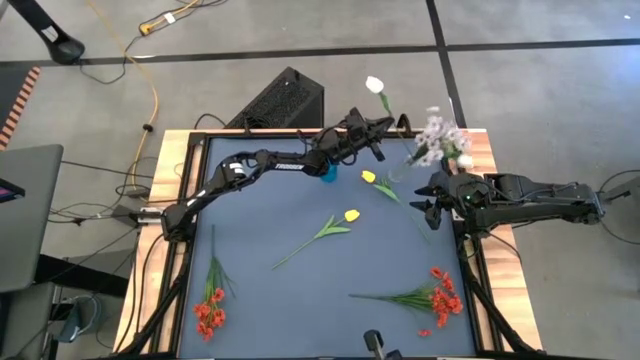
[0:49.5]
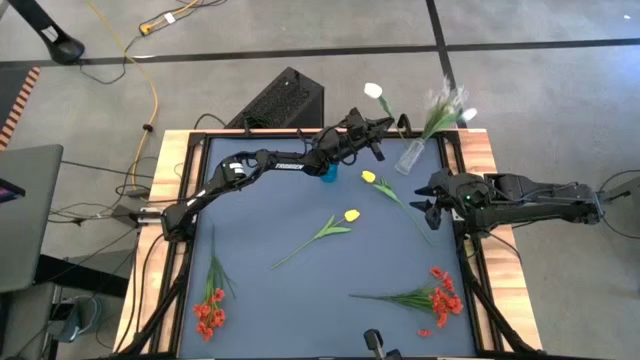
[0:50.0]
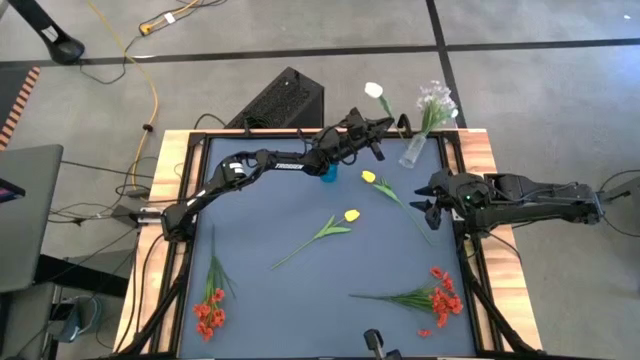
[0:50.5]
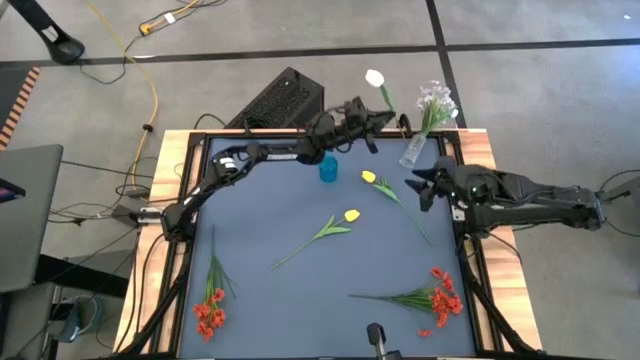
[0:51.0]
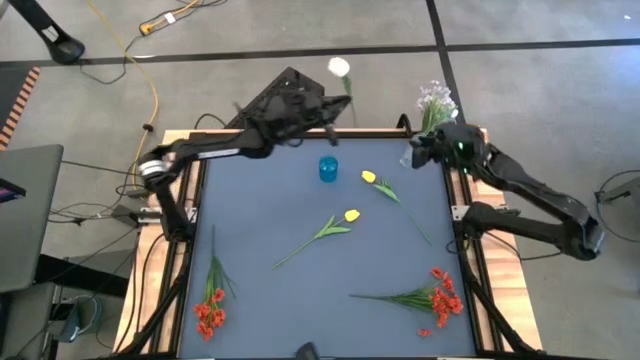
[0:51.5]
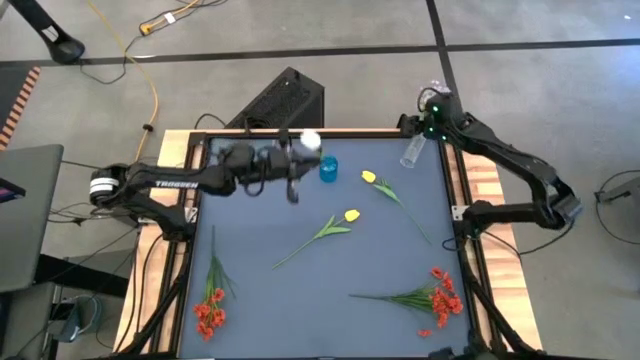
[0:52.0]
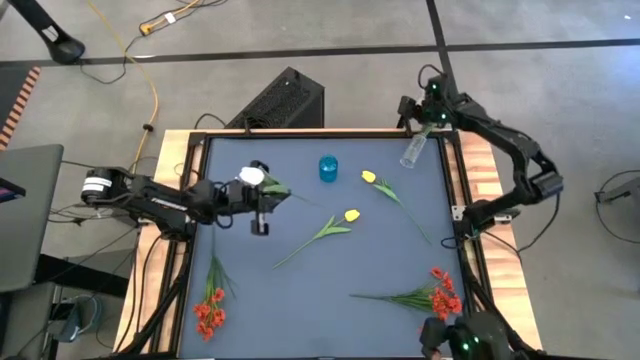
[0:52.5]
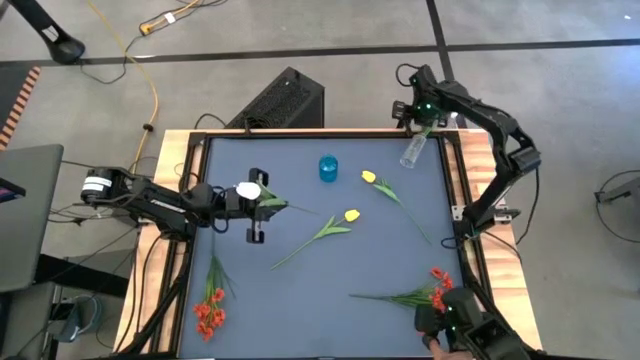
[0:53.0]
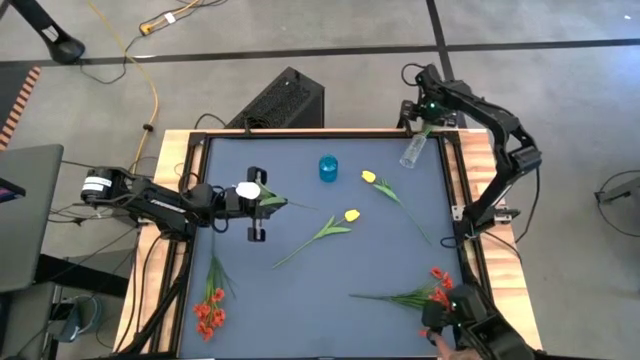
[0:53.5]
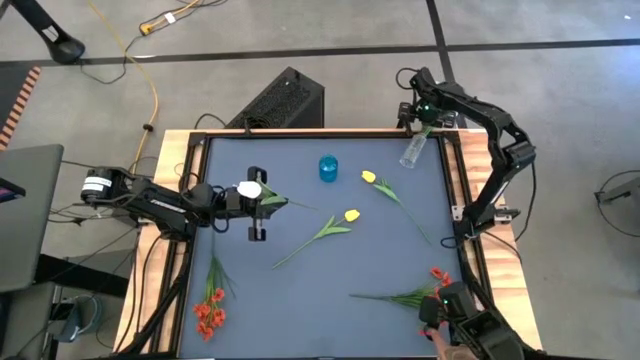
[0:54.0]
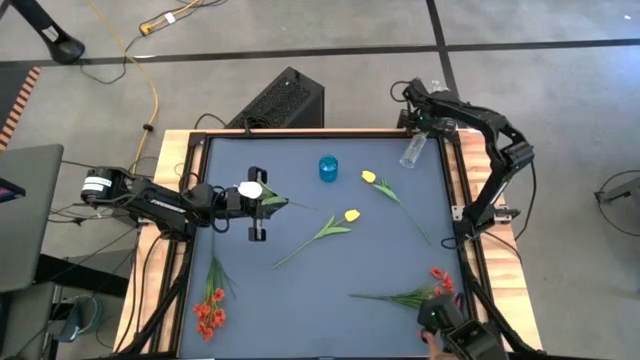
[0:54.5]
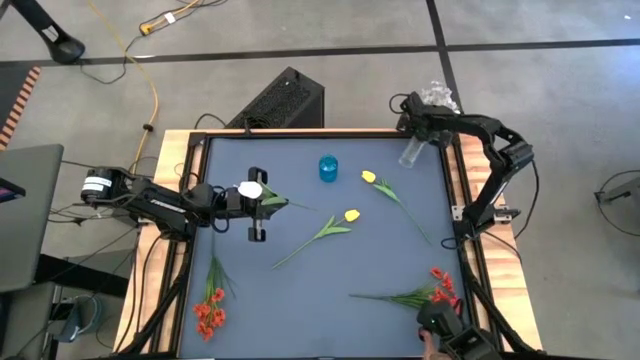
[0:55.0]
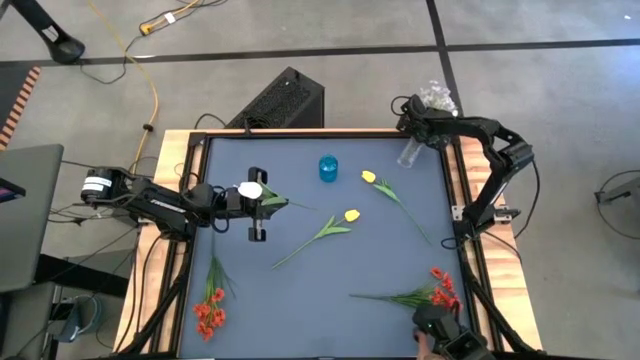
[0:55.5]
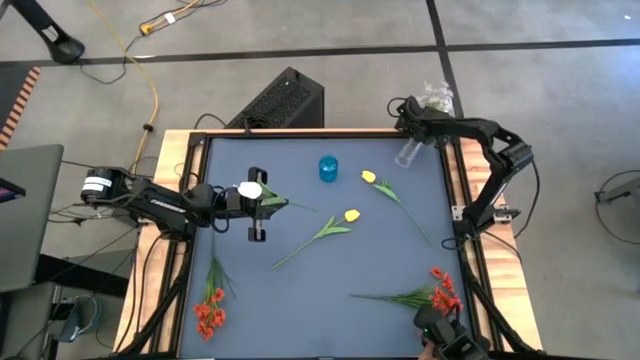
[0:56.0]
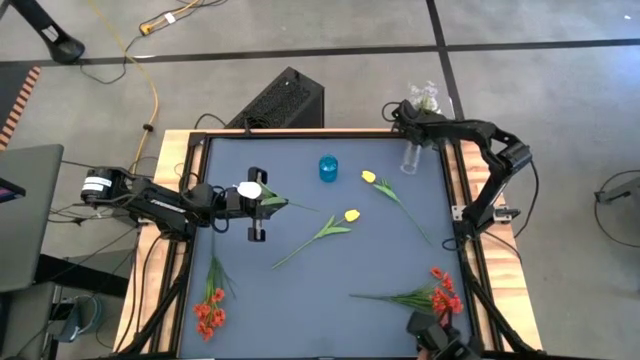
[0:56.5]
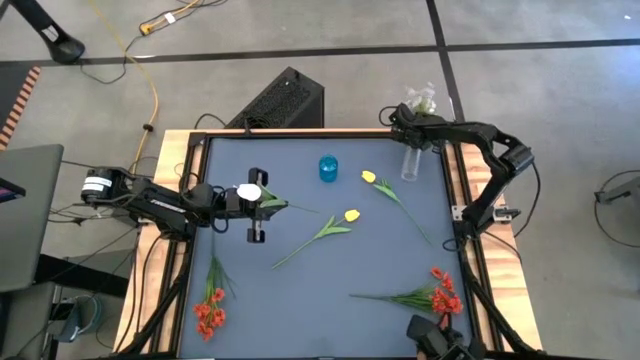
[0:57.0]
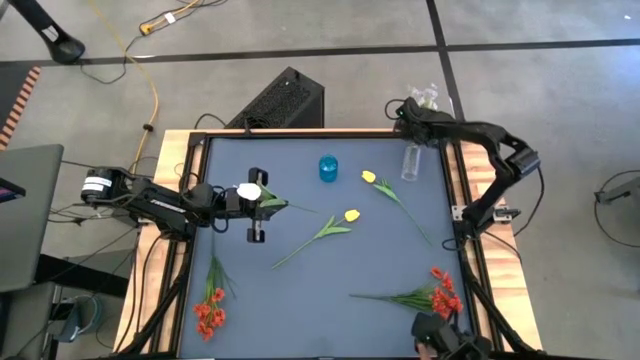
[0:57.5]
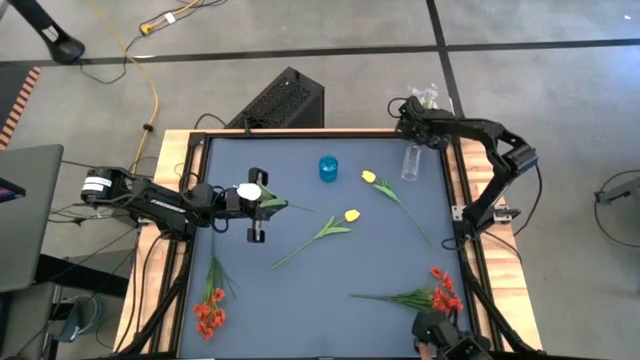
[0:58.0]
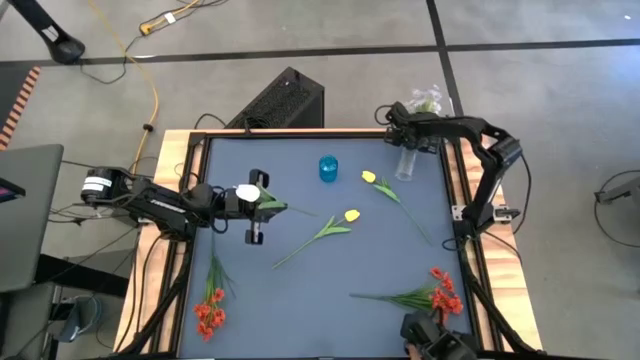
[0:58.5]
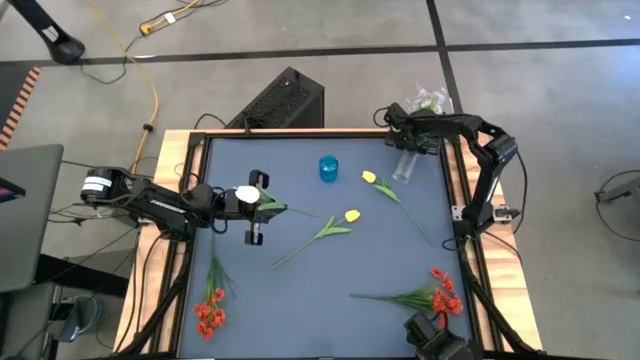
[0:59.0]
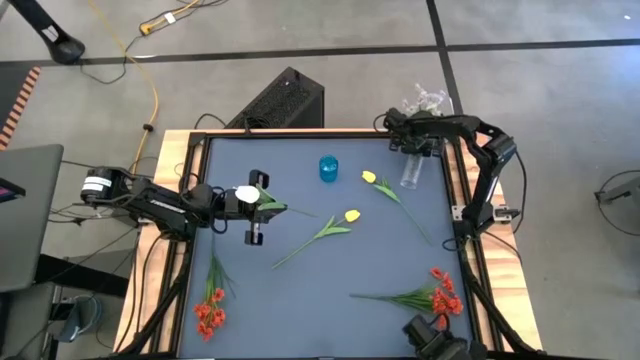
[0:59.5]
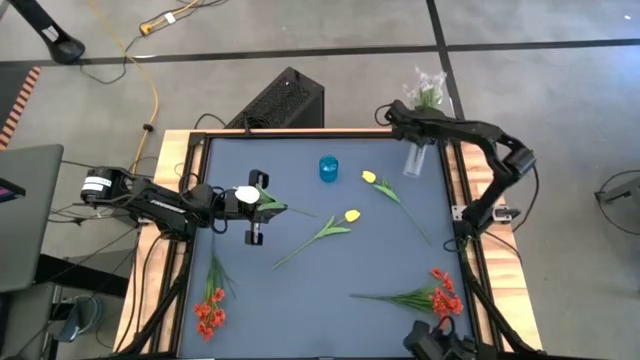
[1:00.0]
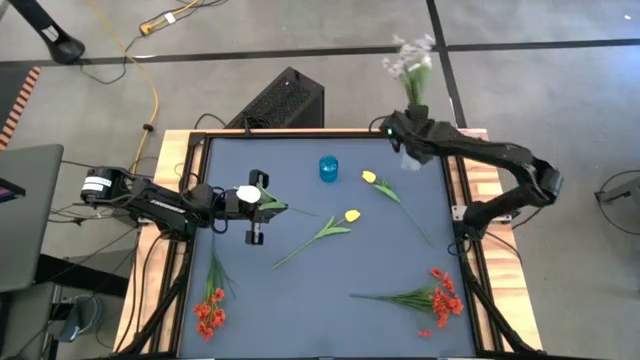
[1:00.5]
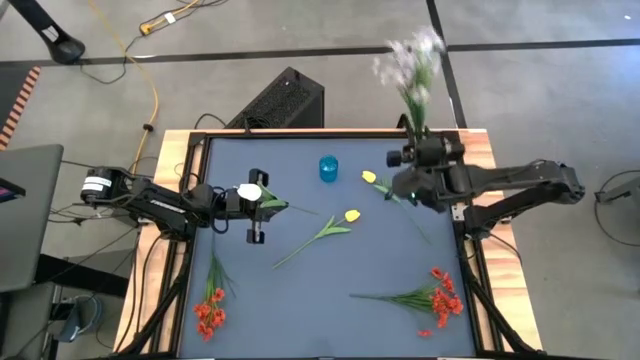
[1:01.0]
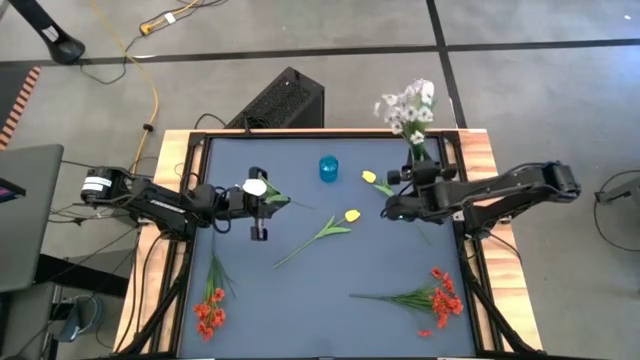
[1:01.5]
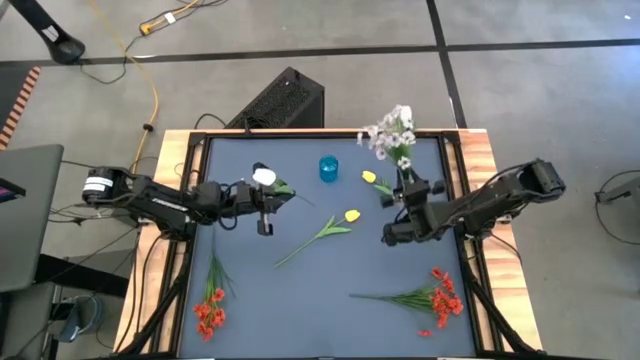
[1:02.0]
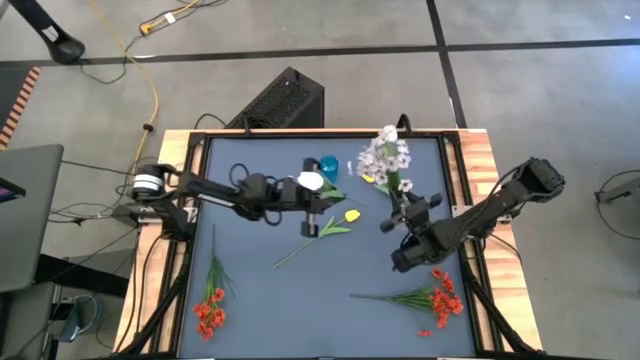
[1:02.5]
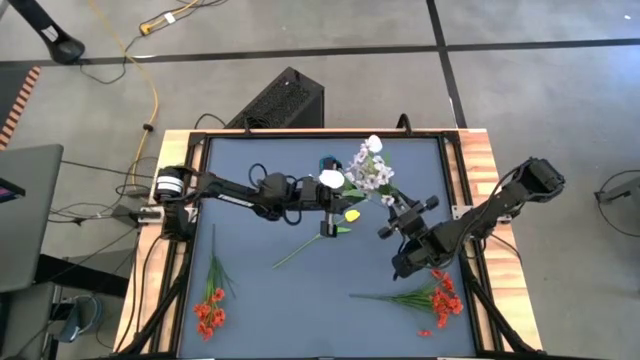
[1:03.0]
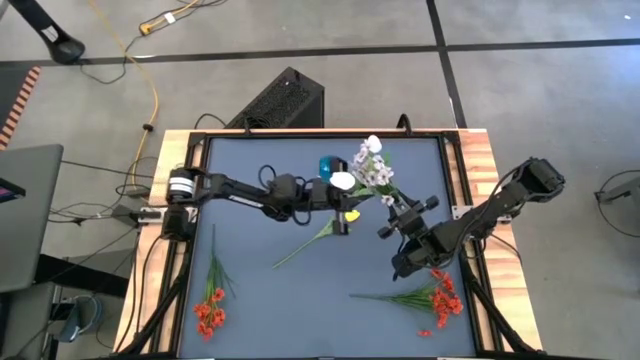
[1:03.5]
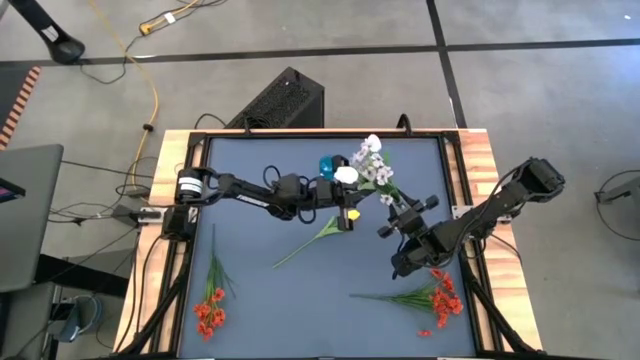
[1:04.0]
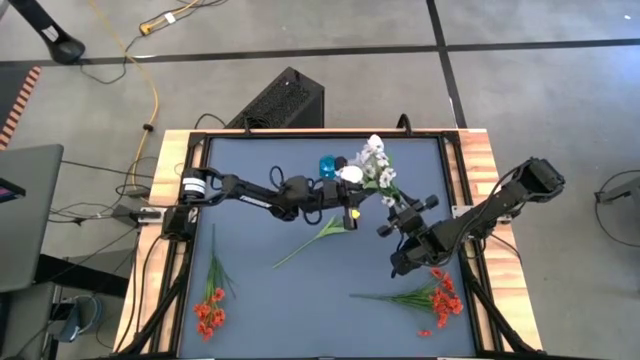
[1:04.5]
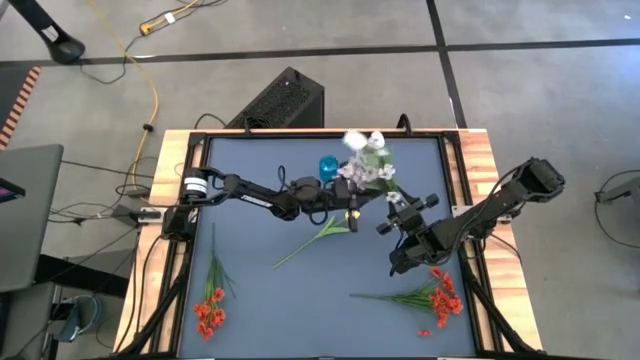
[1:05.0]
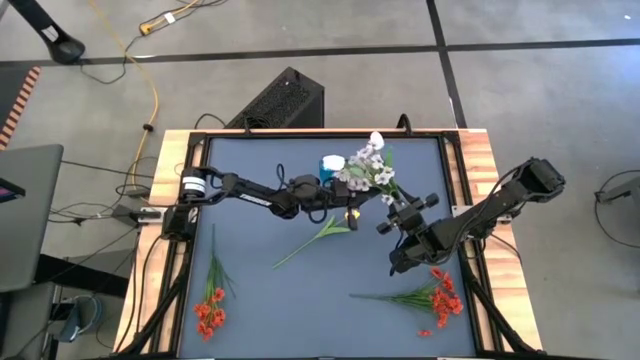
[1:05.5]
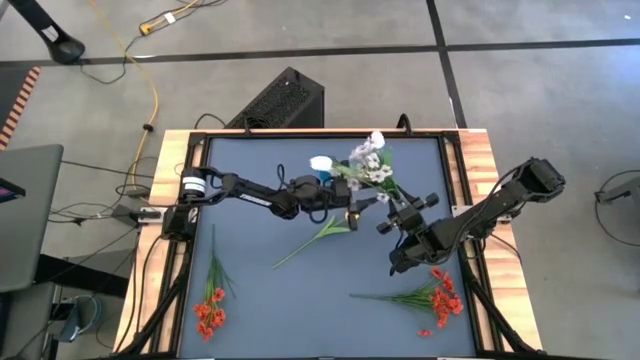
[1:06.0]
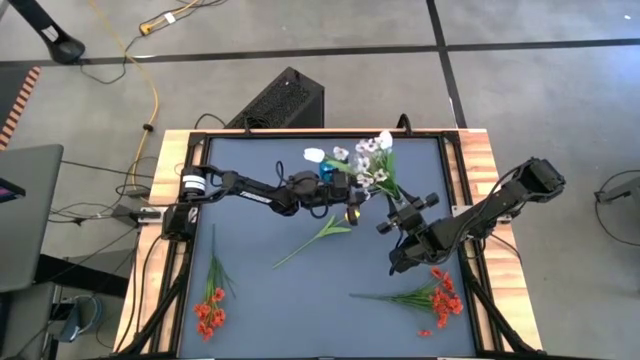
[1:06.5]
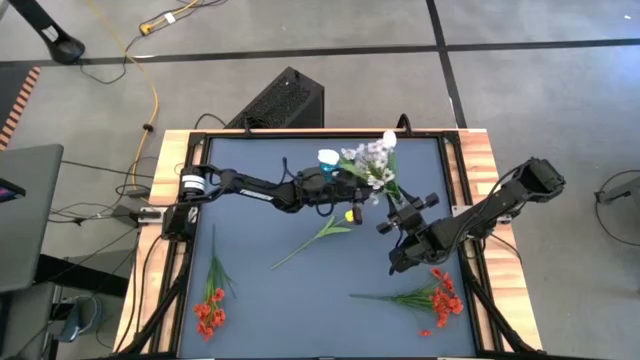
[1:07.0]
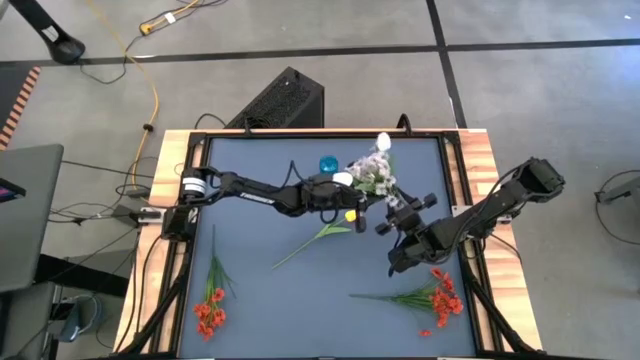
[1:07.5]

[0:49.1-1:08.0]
Task: Sort flowers into vase by color
Put the white flowers into the transparent vase
